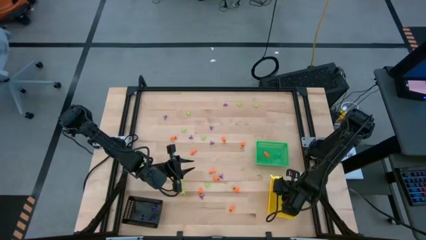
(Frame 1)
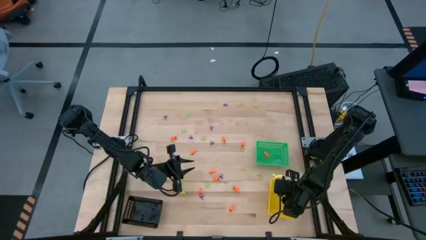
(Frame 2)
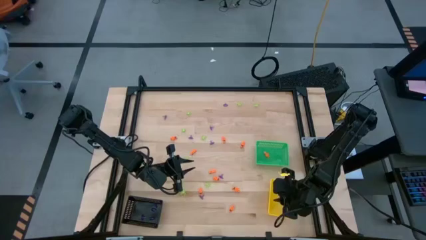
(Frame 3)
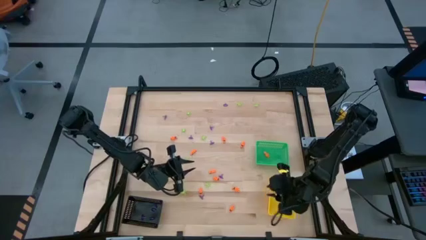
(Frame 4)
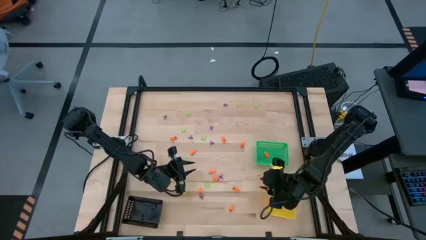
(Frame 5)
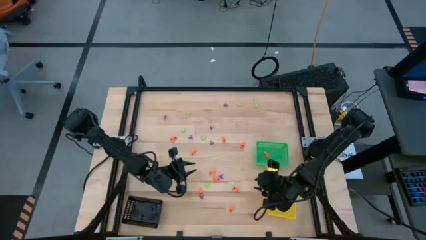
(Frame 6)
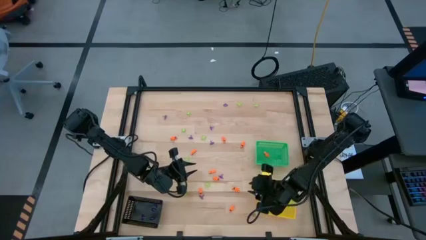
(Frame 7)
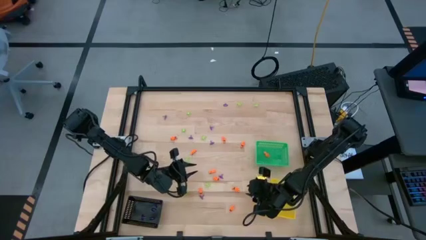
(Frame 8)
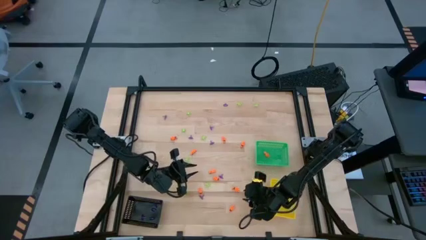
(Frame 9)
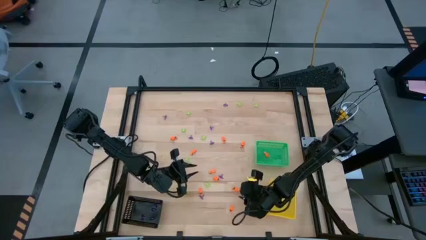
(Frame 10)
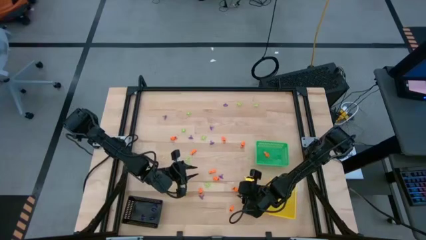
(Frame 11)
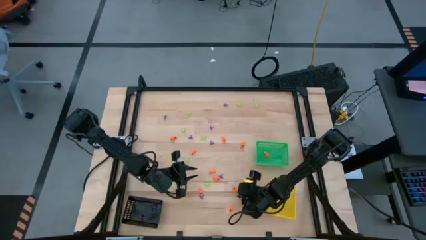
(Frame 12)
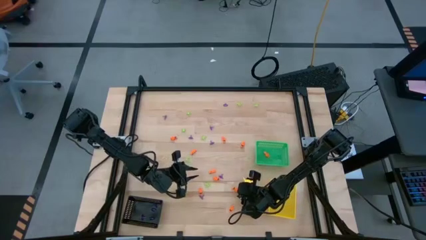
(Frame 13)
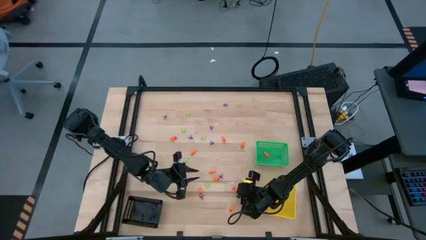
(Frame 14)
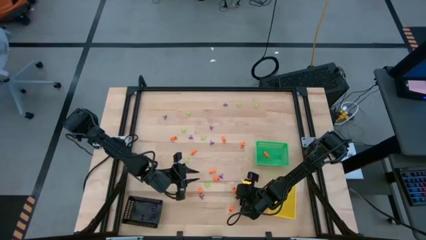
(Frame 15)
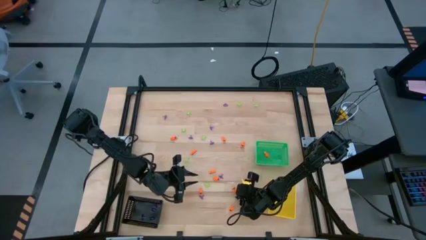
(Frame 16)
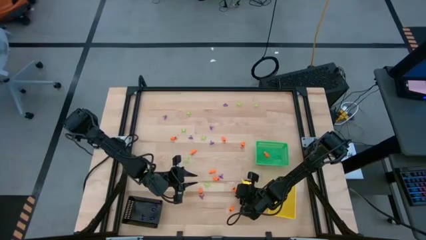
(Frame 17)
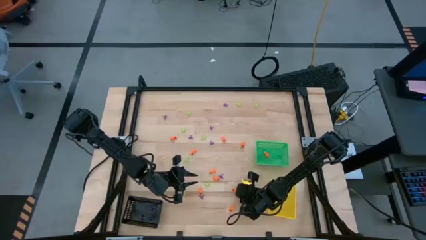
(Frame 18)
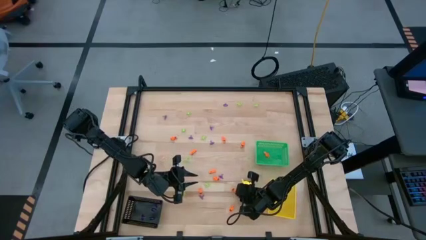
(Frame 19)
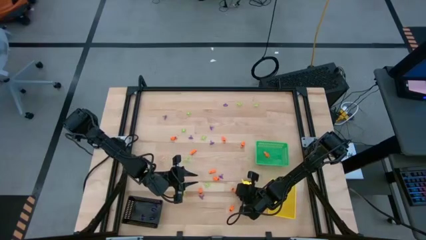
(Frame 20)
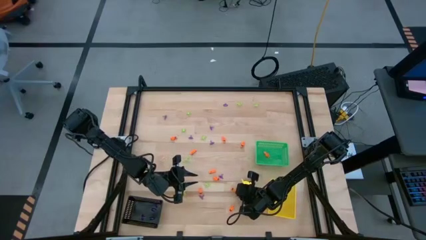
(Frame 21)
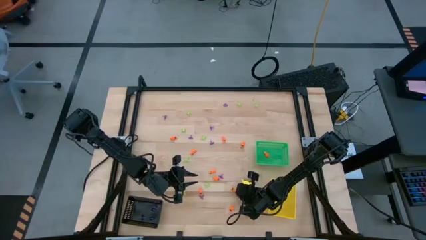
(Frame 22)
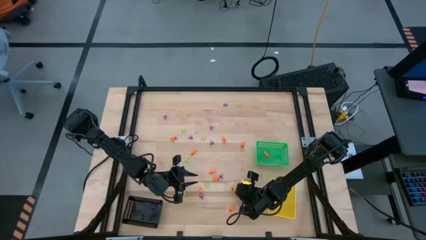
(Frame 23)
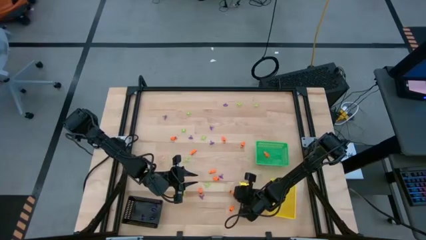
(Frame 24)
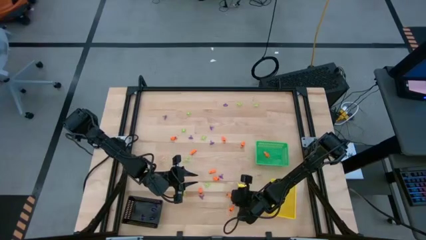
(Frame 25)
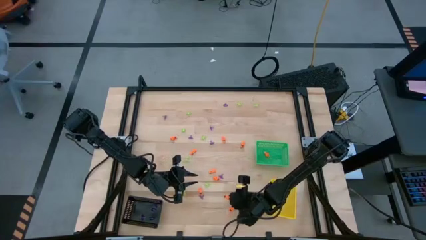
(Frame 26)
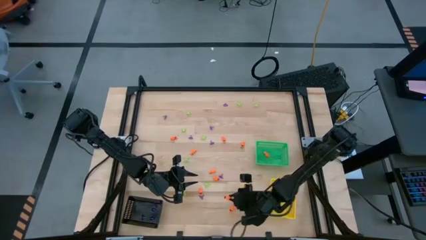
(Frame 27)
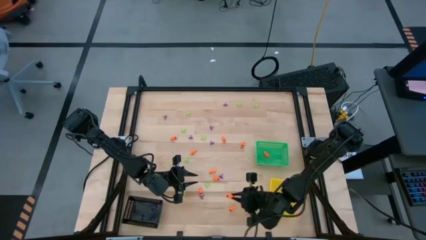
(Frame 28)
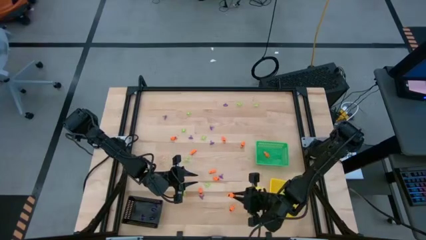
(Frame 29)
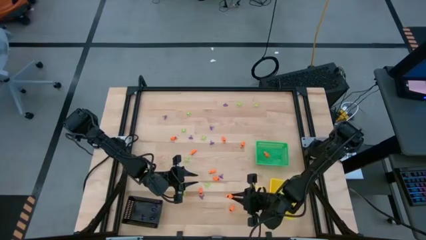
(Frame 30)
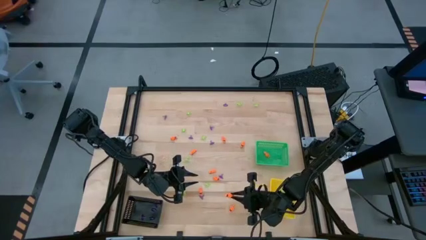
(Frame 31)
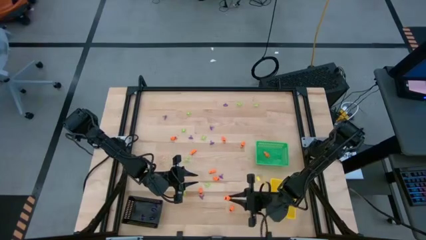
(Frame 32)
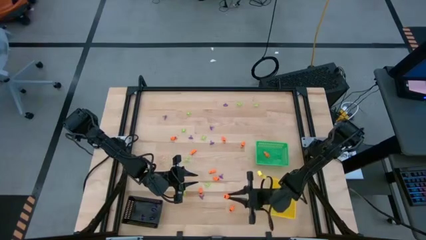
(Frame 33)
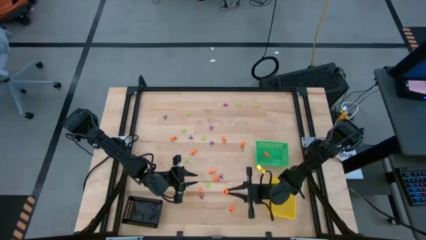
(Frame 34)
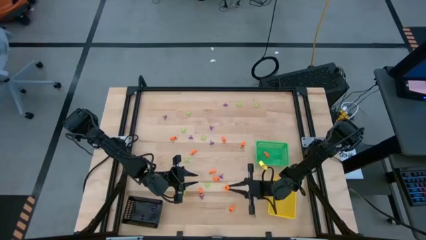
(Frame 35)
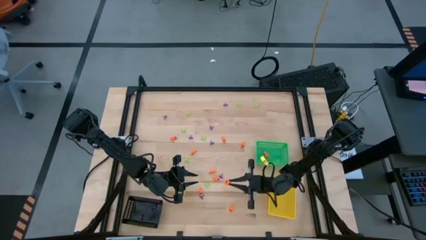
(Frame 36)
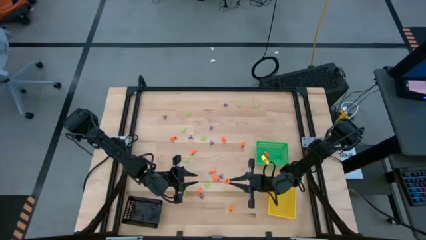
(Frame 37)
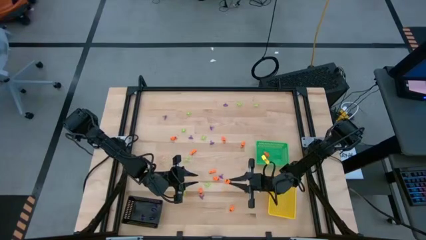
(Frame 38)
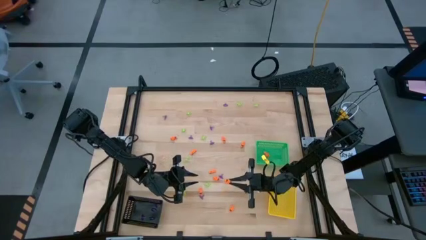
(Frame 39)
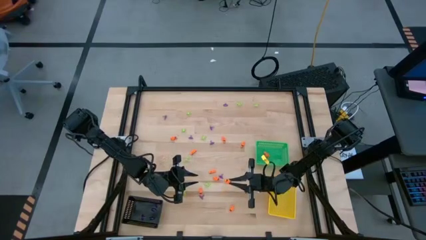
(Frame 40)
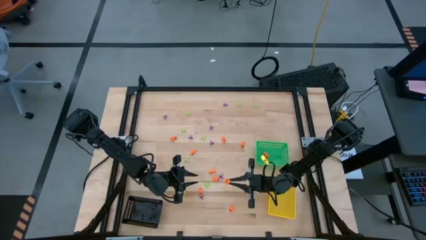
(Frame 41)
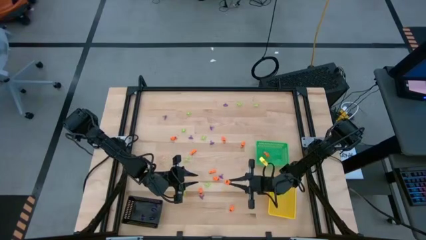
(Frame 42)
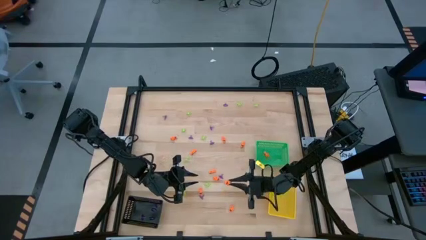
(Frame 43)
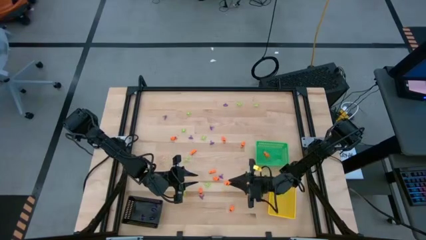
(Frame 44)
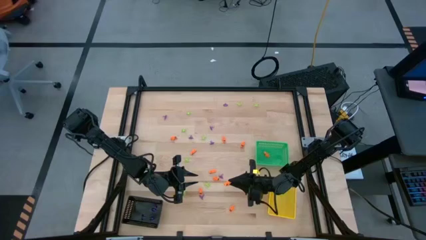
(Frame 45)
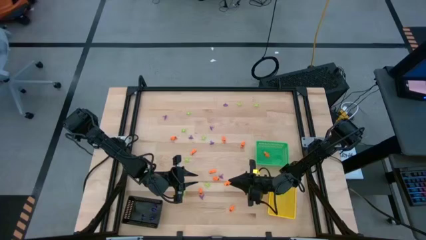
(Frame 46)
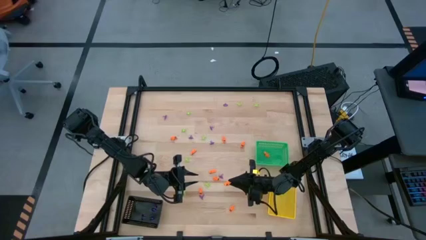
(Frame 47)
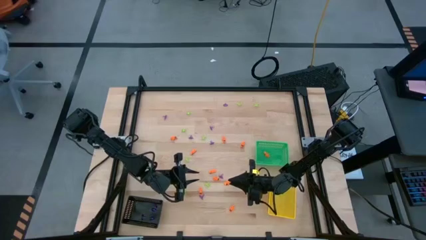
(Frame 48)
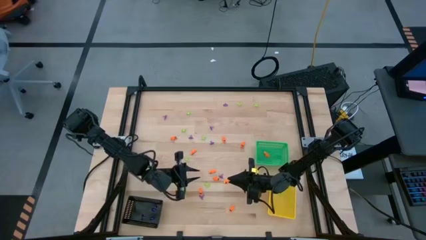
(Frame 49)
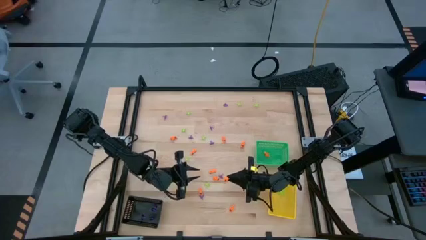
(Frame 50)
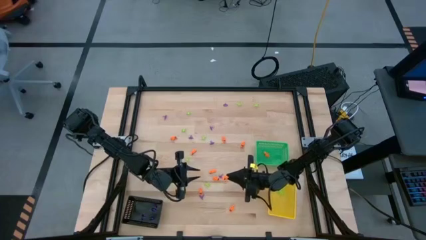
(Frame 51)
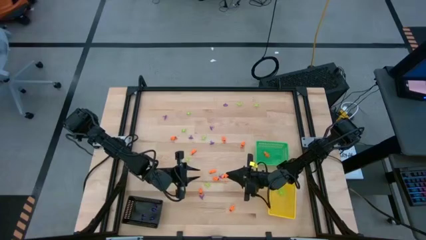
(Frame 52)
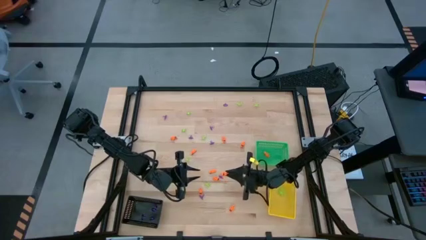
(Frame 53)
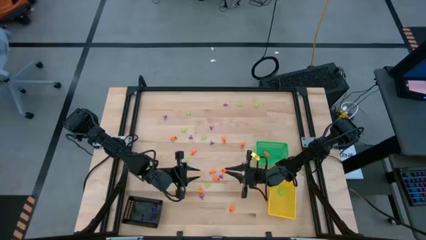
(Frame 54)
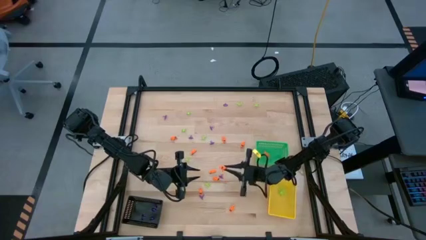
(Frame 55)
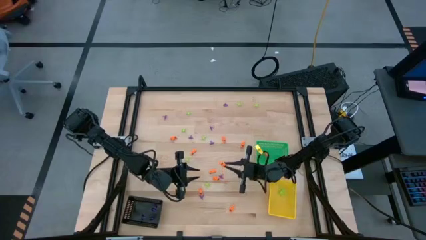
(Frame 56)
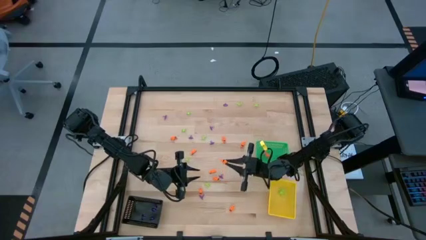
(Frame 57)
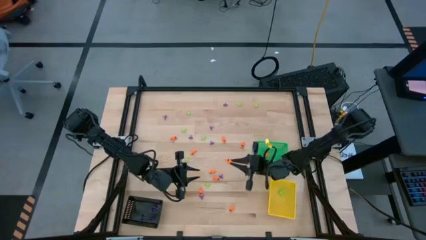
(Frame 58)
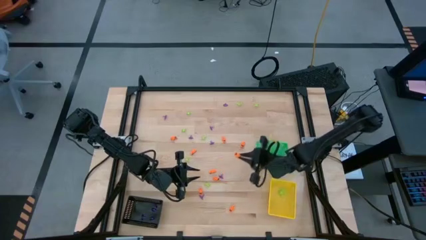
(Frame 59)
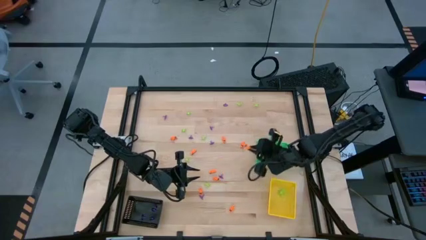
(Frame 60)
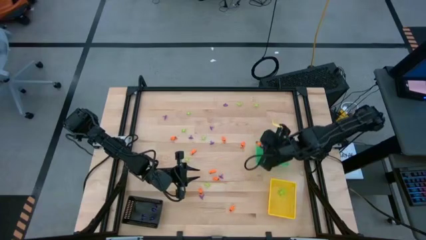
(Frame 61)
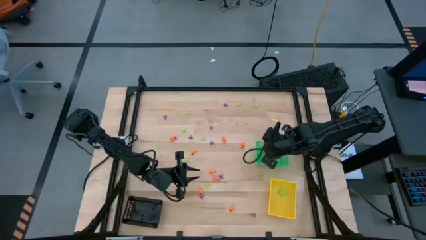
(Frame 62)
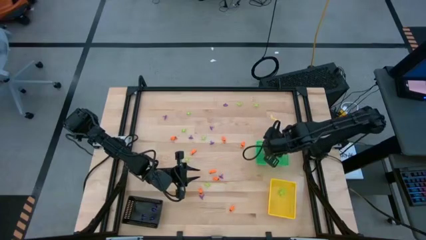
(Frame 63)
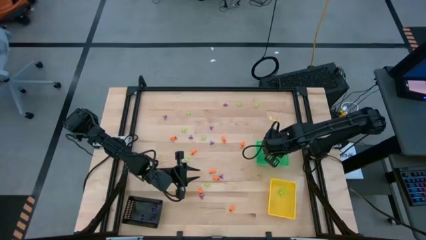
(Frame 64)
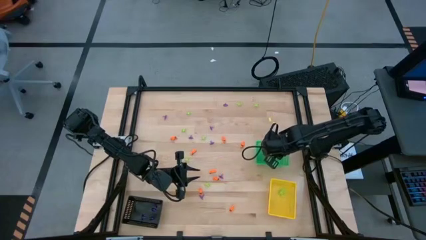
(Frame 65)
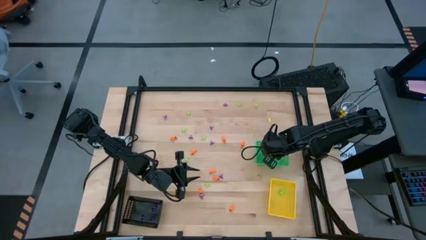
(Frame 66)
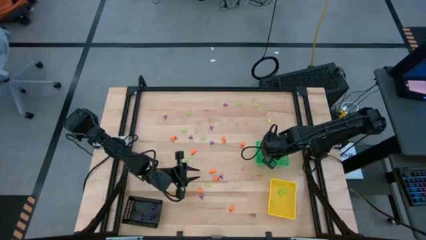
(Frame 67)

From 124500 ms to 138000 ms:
Task: Sort Halloween decoration
Put the orange skeleton toy into the green bin

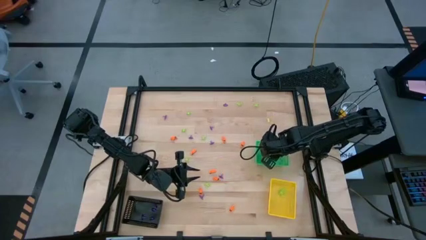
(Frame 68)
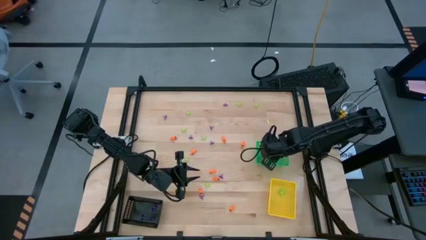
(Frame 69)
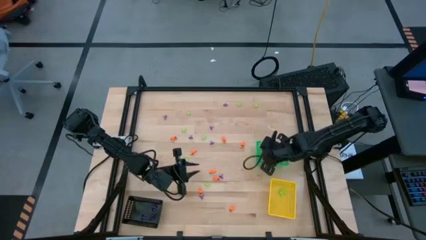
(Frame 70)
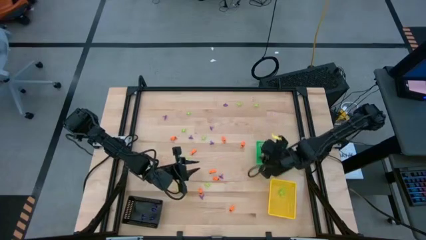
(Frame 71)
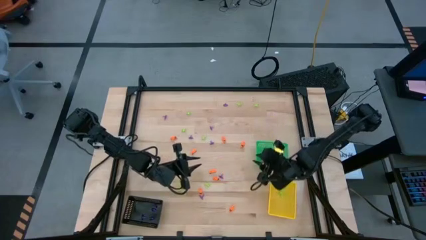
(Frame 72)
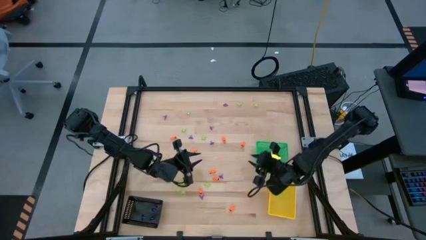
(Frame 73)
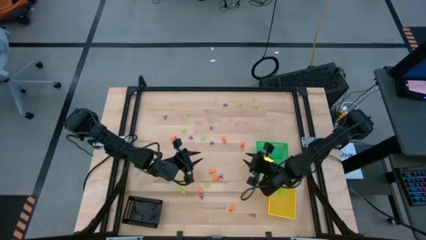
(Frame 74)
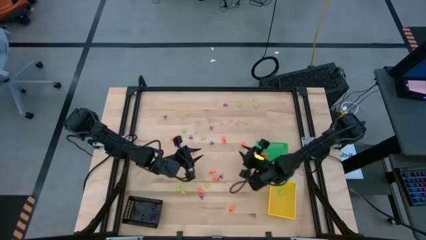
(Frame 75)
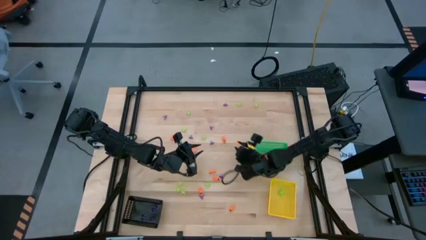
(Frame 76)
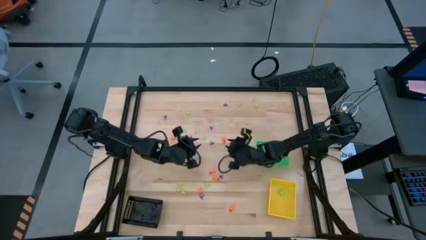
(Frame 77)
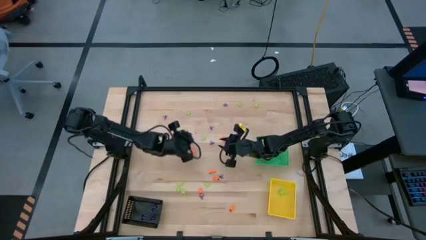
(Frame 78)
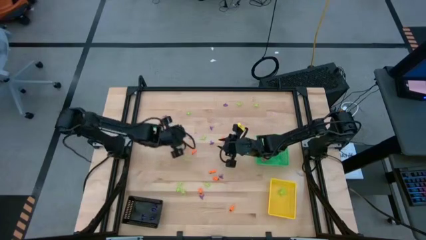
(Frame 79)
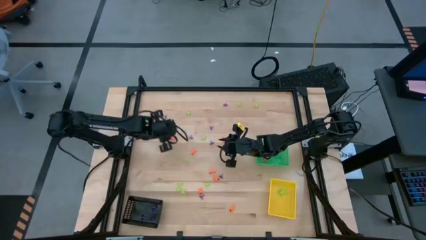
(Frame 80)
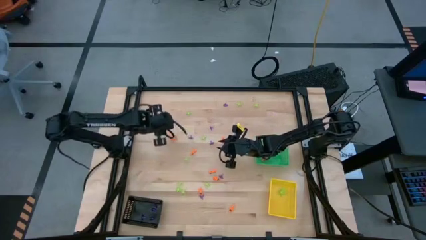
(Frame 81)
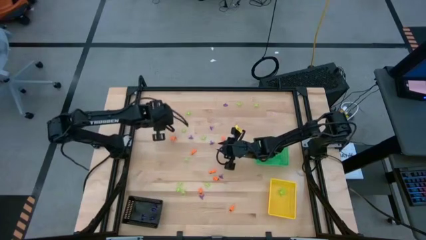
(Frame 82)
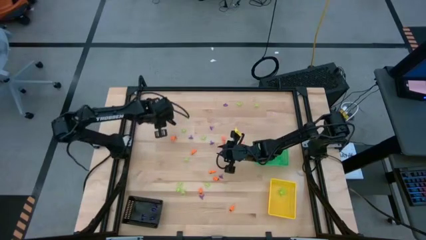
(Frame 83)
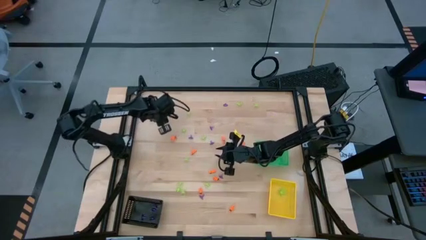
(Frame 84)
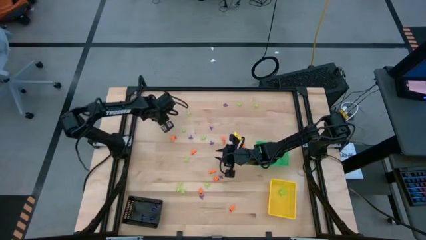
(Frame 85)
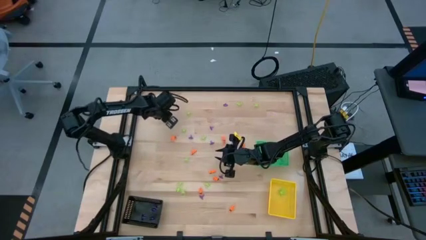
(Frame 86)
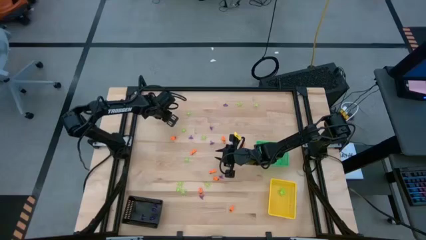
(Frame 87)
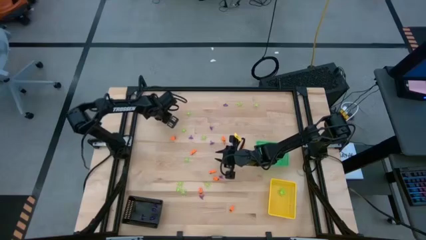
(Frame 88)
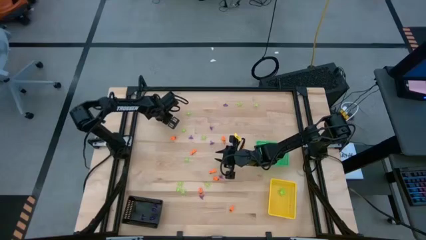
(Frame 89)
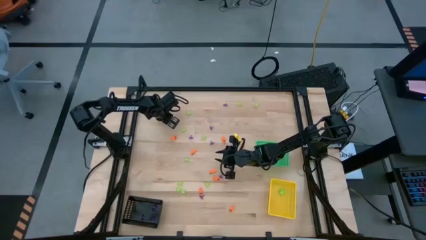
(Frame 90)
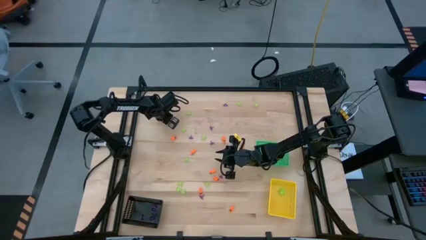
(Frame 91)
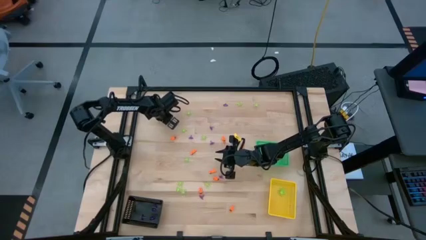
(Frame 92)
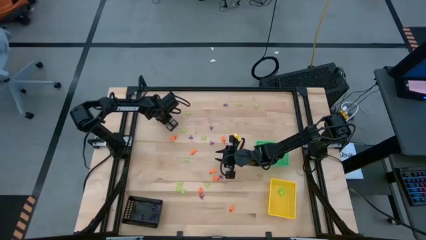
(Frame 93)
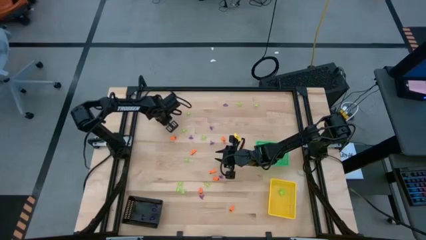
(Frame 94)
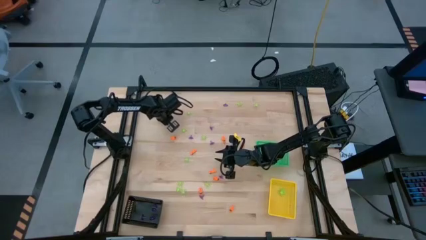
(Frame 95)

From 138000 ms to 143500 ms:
Put the purple witch hat toy into the black bin
